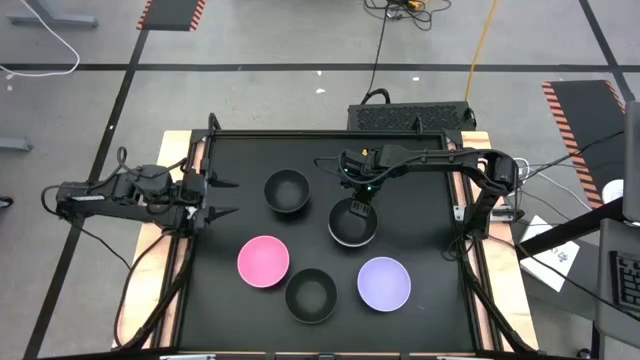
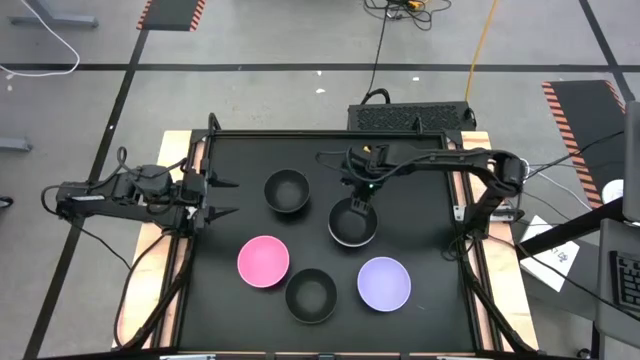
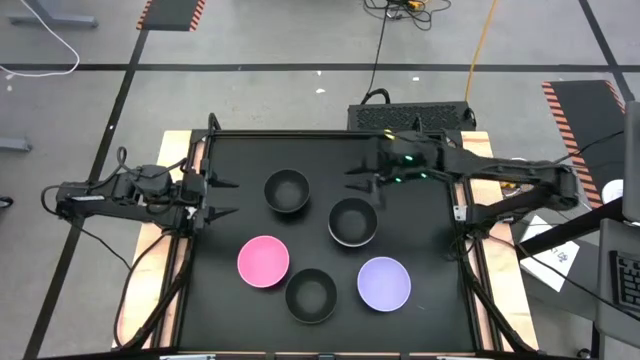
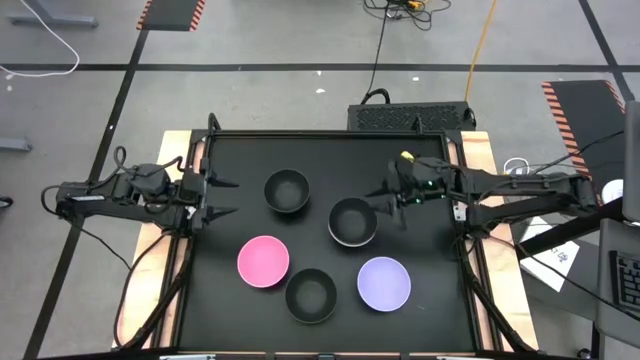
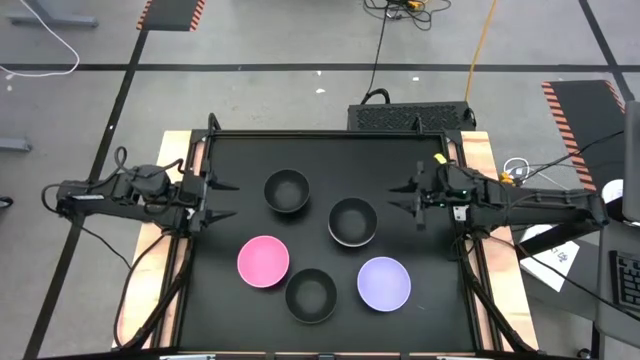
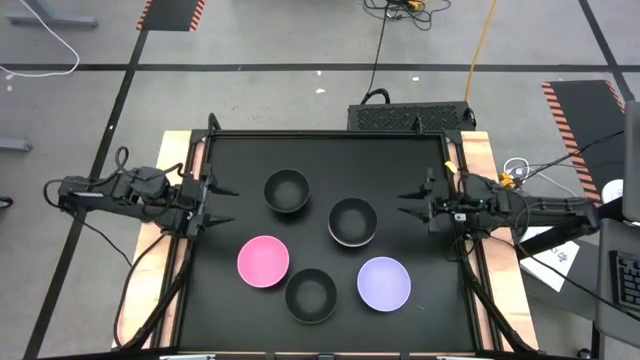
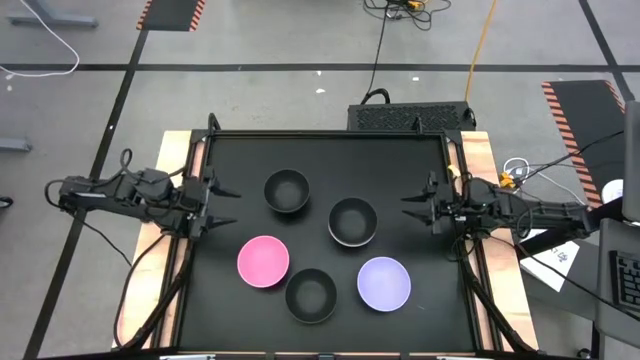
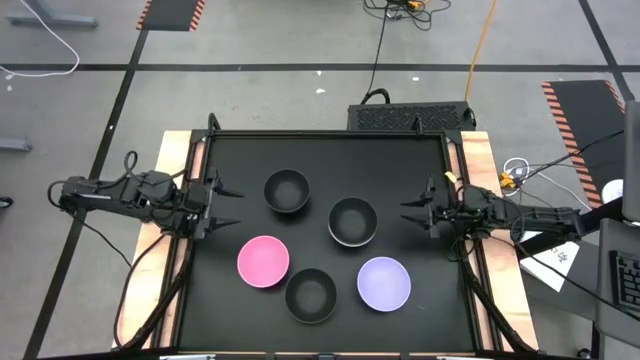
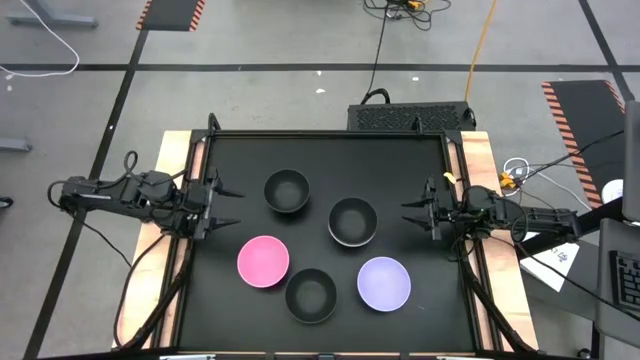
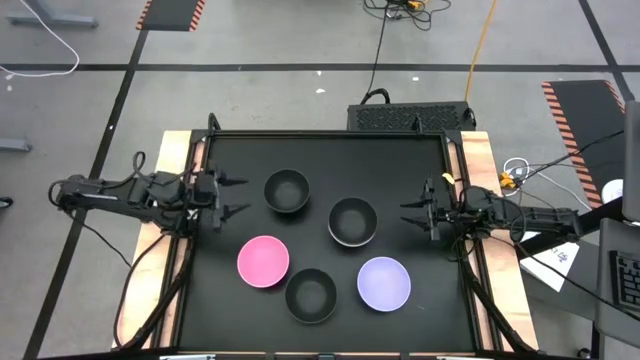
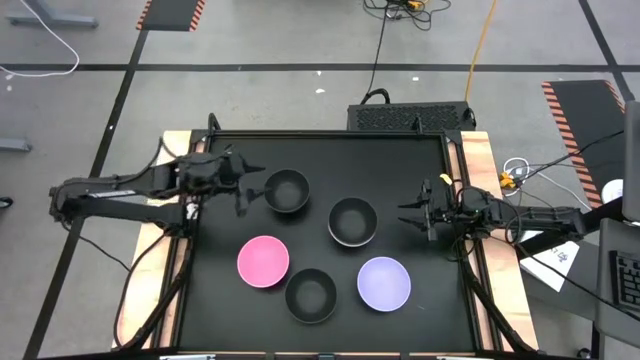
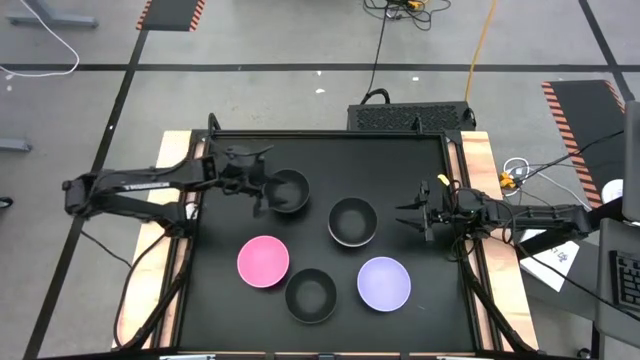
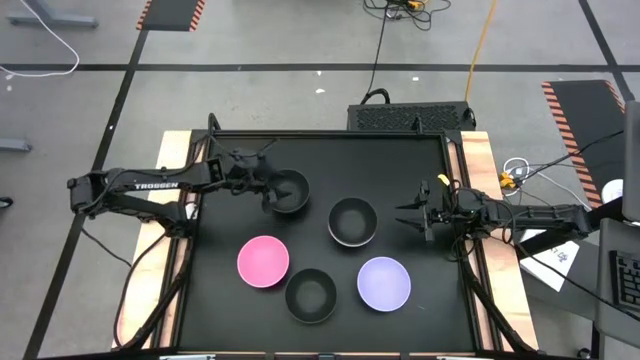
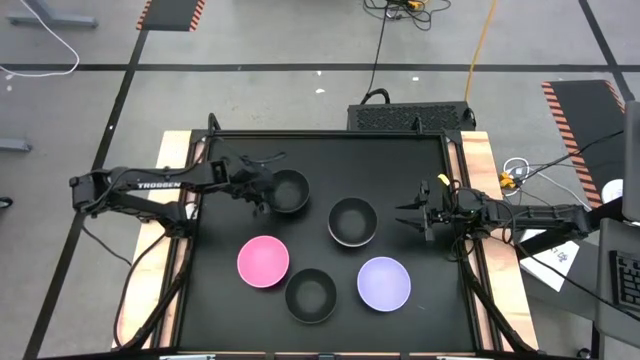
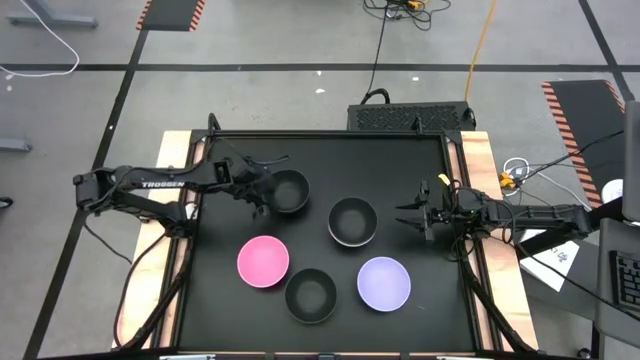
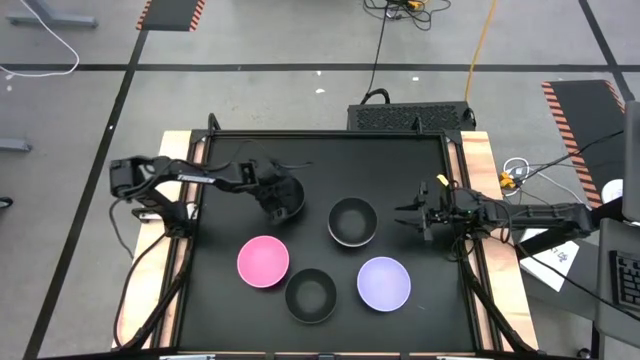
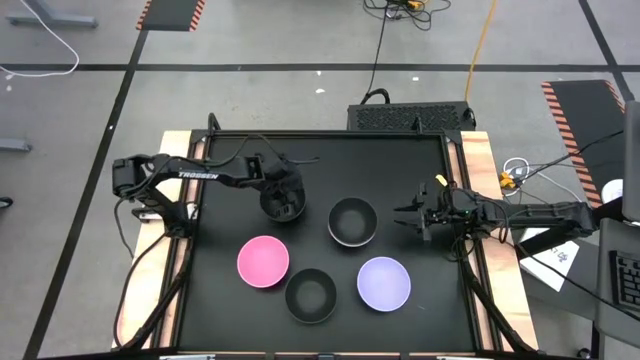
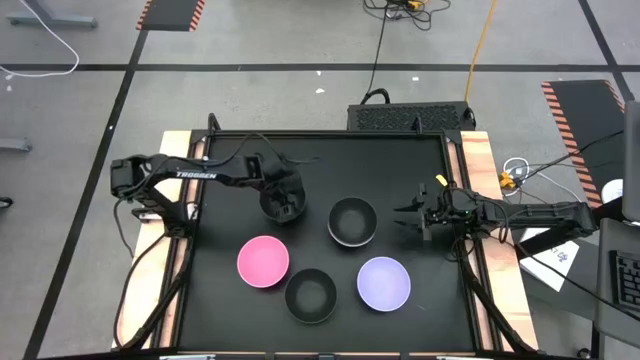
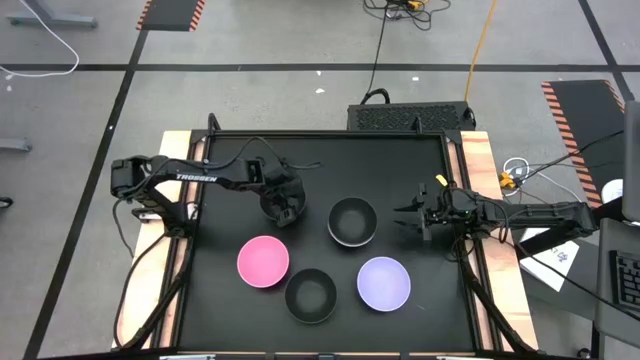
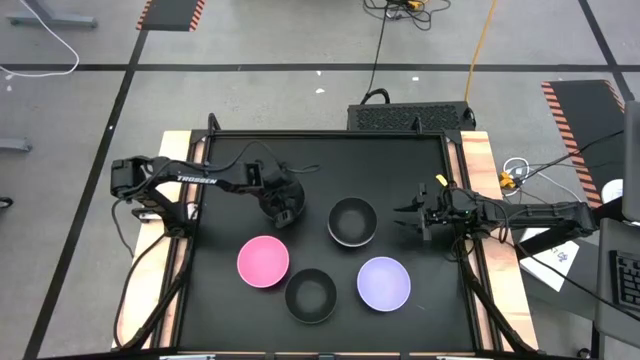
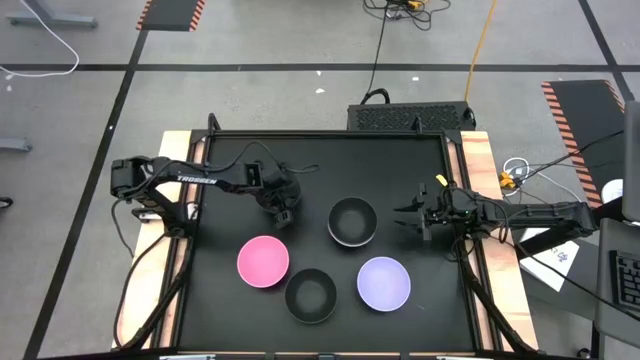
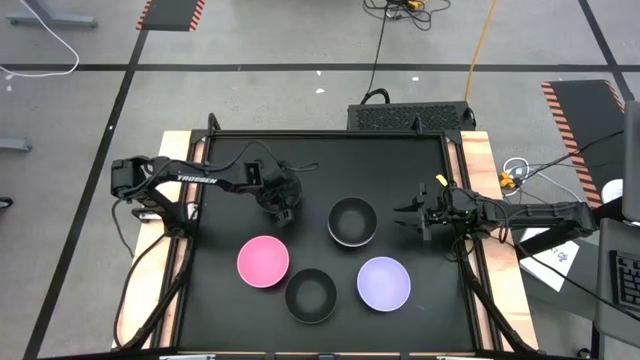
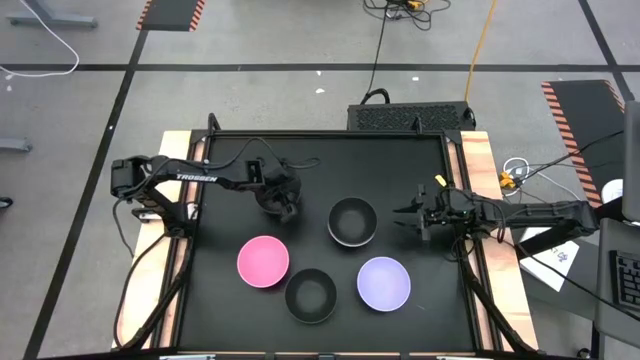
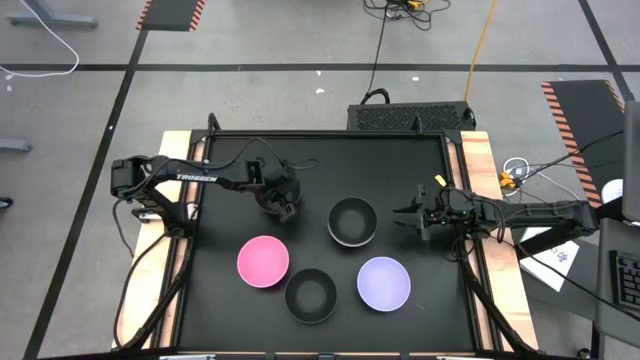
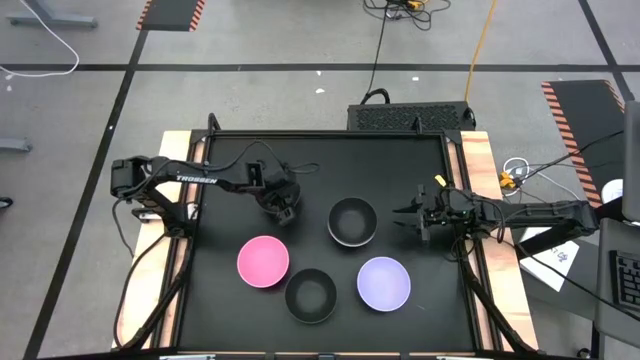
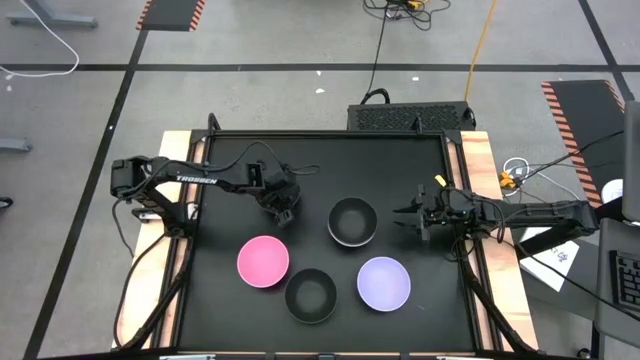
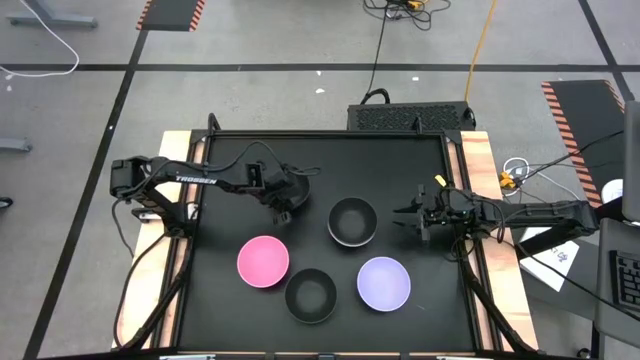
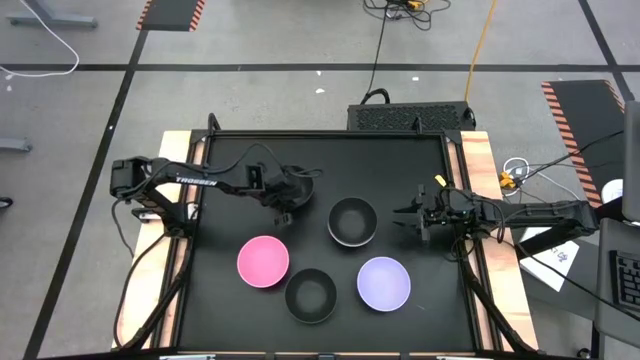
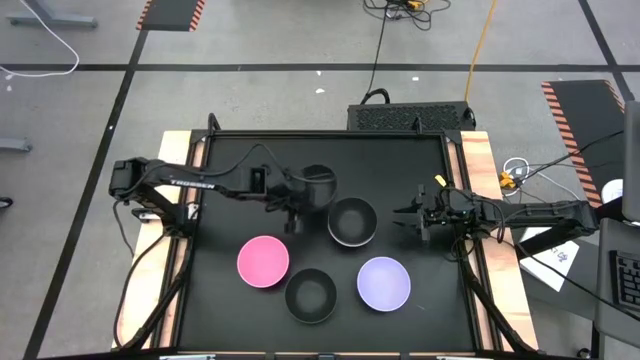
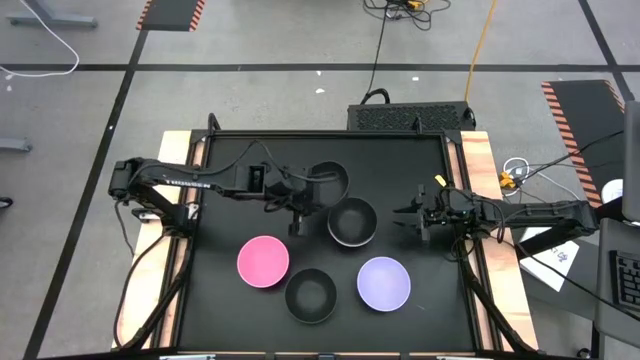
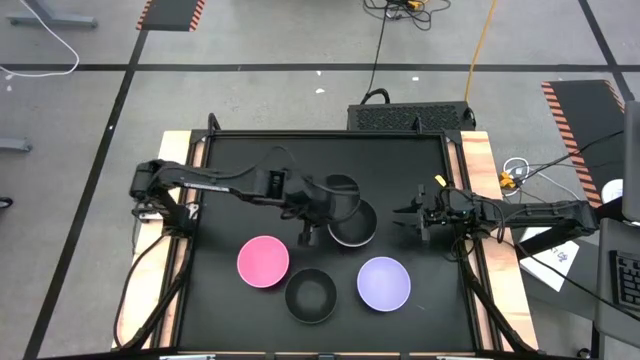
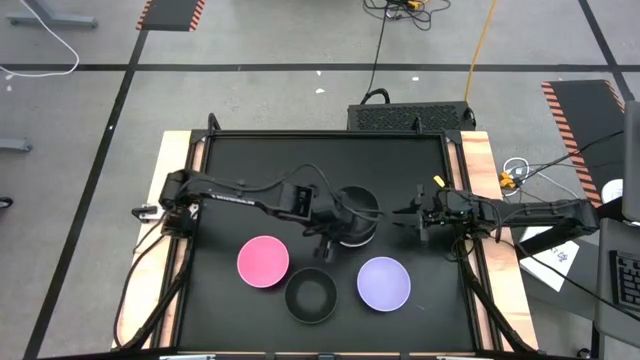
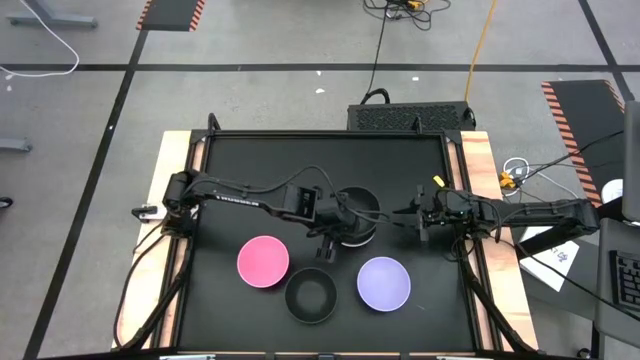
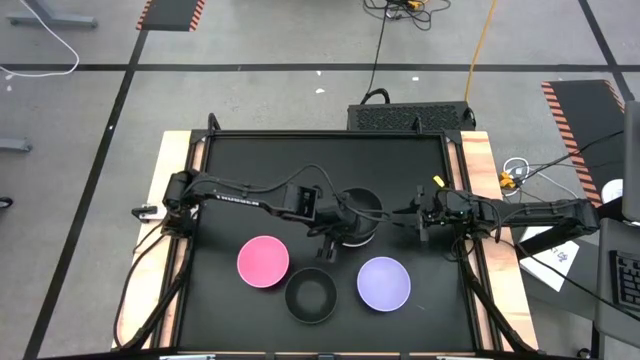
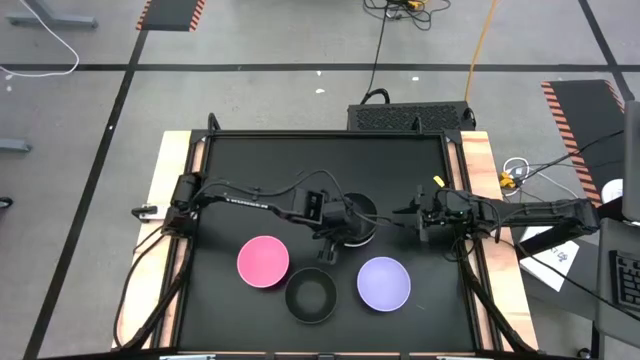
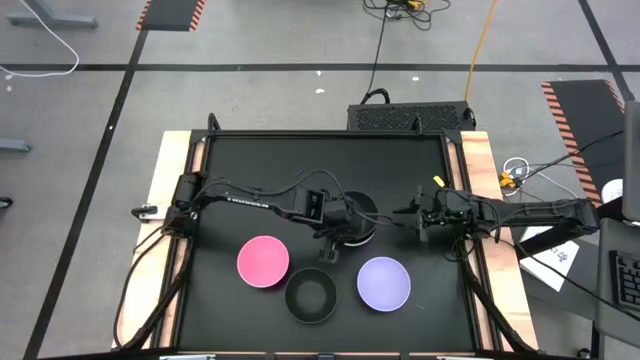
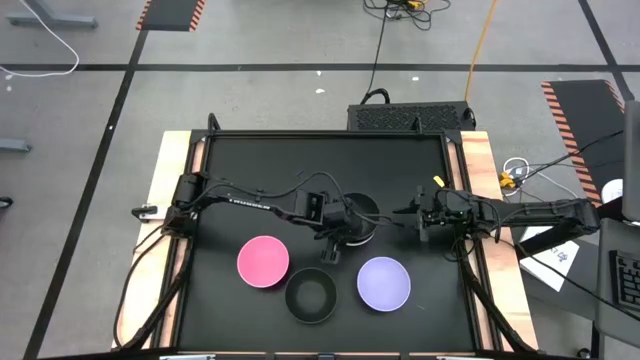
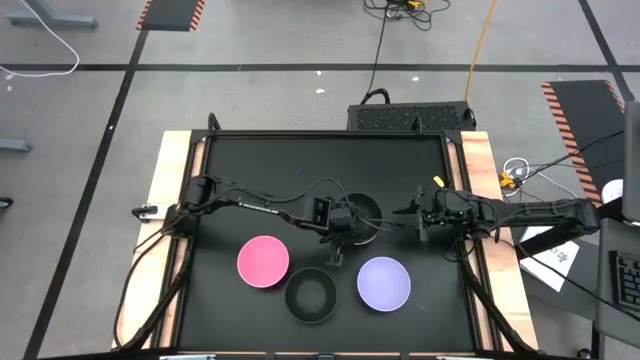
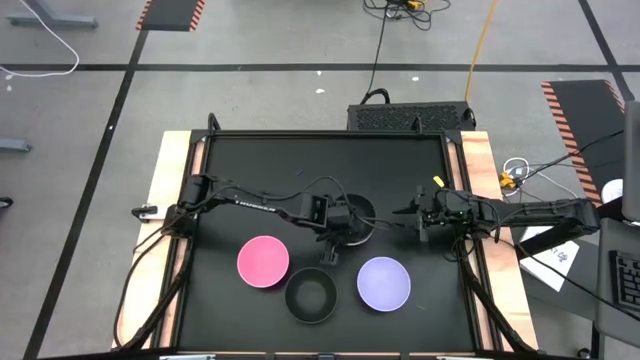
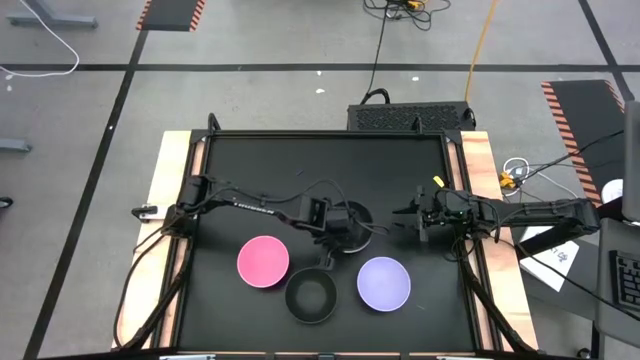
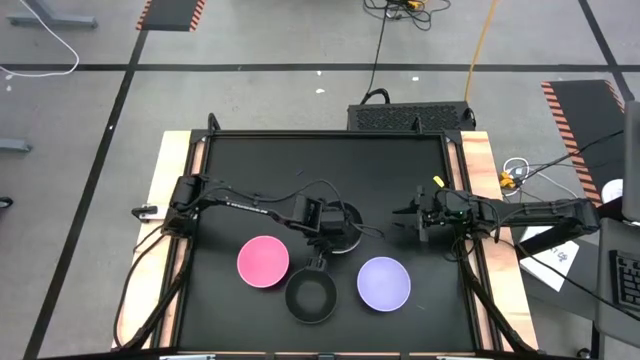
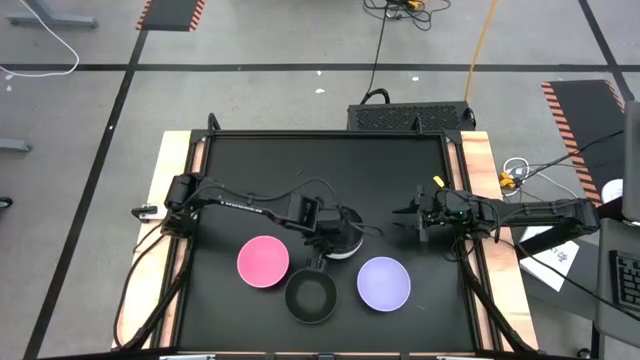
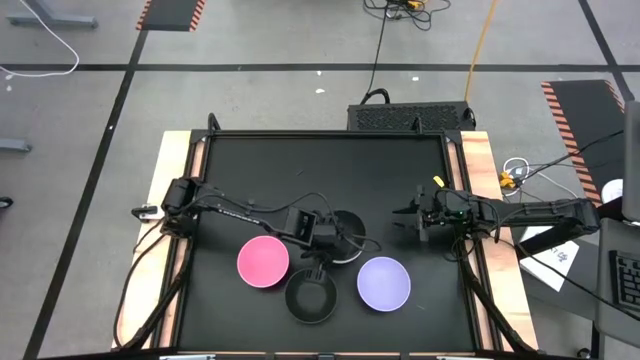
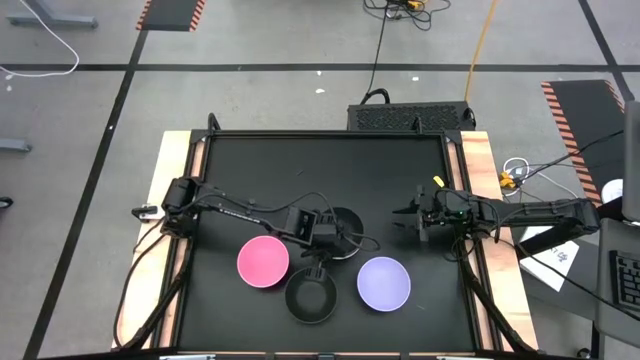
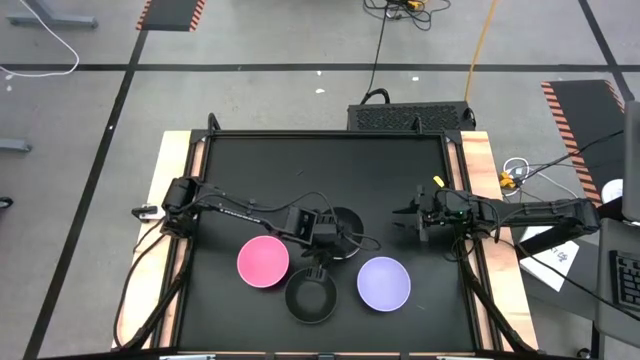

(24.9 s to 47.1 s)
Task: Nest bowls inside each other
Stack the top black bowl on top of the black bowl
